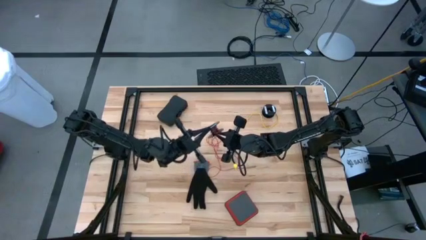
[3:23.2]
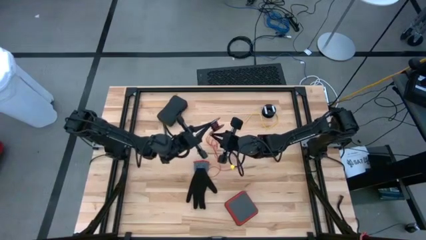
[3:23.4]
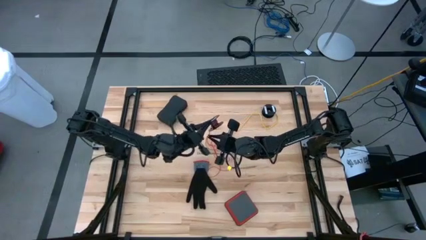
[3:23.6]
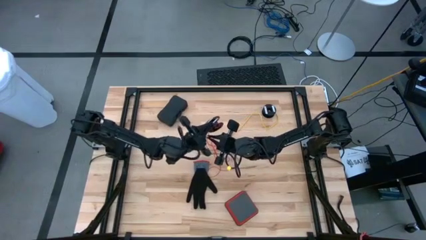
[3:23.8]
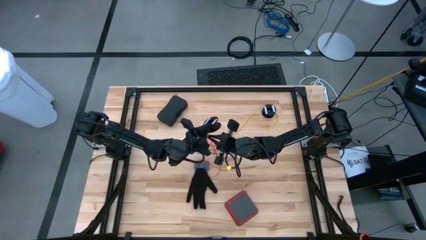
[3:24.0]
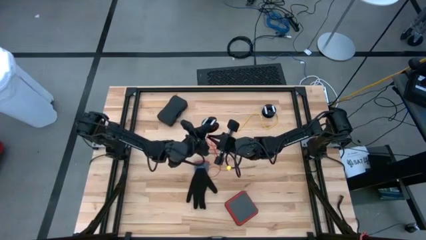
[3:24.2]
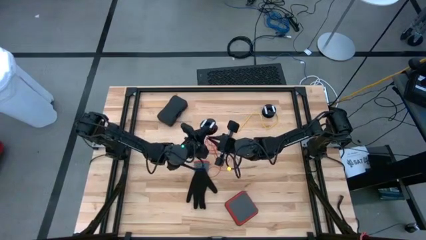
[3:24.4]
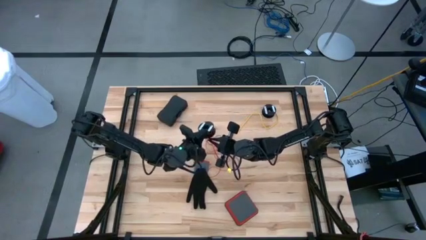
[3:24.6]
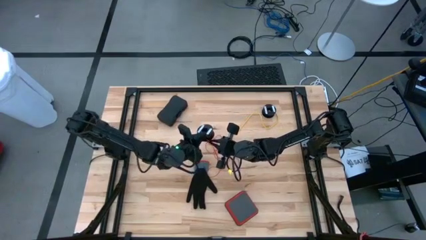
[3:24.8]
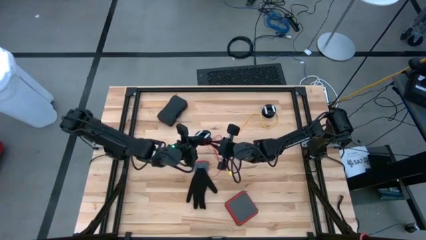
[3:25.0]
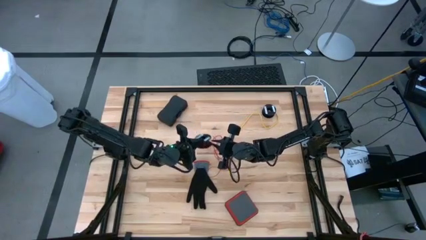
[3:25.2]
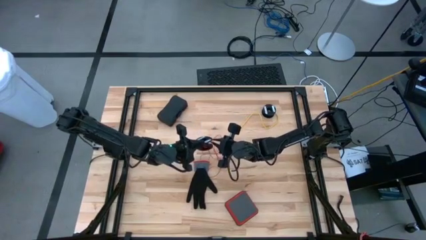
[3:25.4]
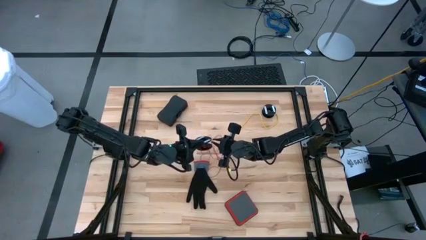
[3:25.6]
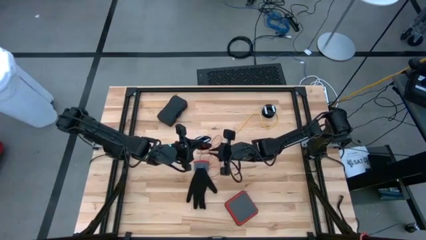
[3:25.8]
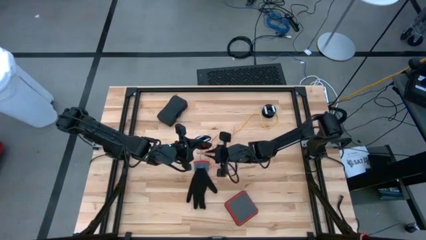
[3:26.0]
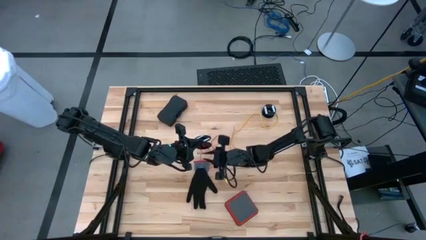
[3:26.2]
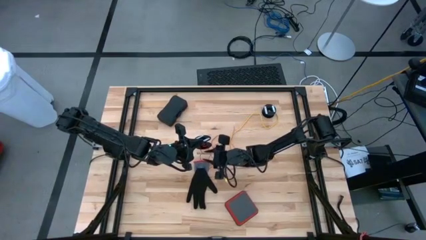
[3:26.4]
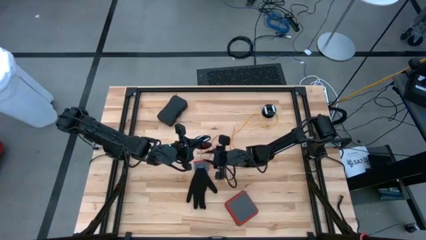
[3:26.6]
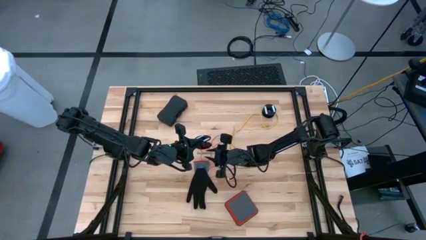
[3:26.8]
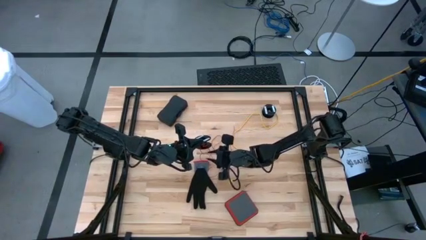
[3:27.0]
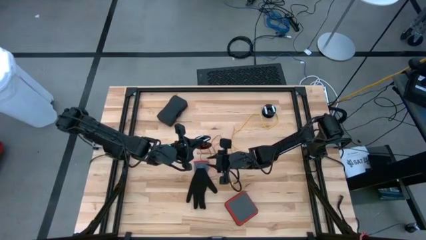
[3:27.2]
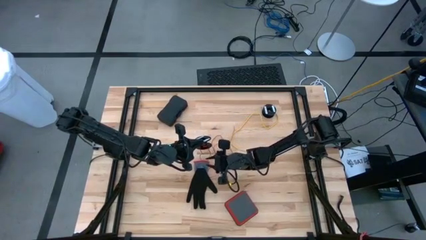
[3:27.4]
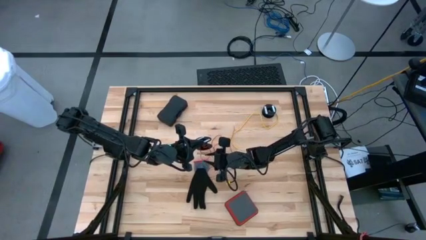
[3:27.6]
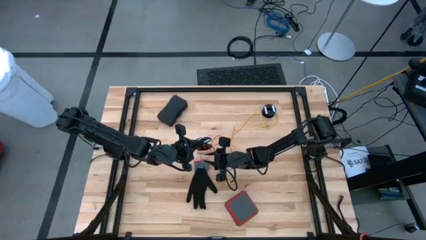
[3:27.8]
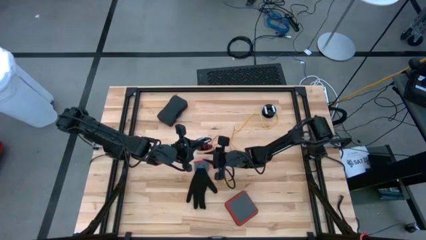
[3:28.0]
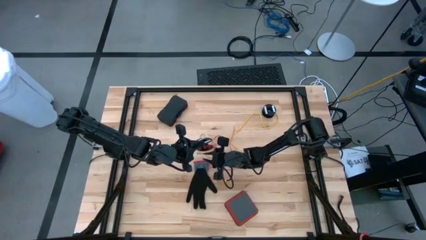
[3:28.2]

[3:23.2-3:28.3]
Task: Coil cords
Coil the red wire onto the black spool

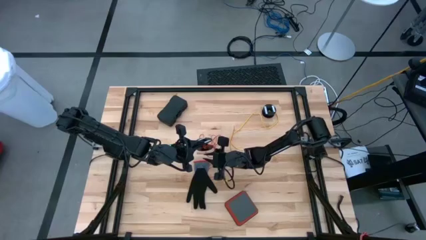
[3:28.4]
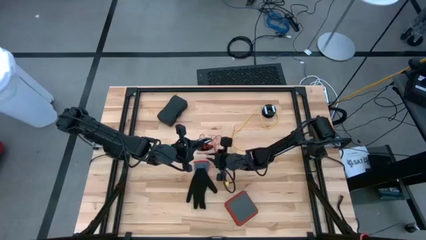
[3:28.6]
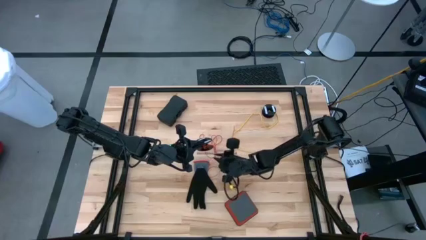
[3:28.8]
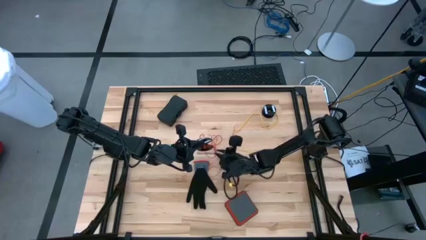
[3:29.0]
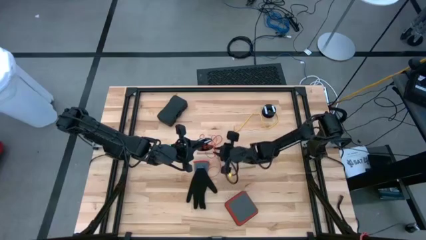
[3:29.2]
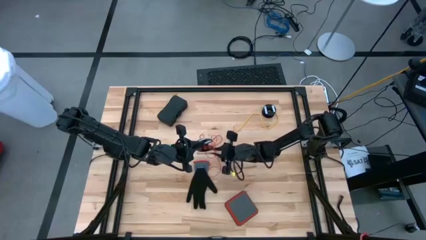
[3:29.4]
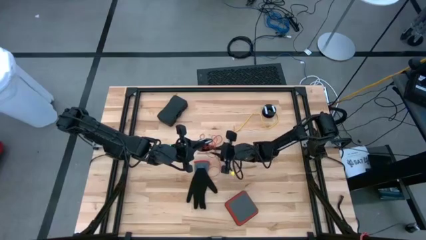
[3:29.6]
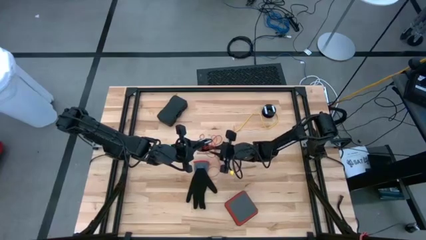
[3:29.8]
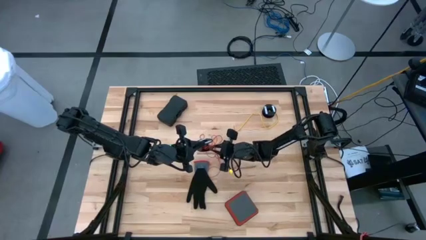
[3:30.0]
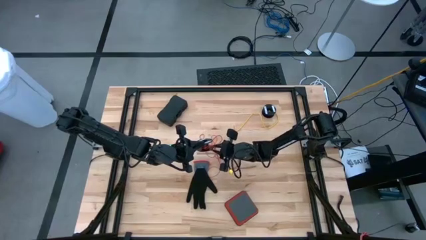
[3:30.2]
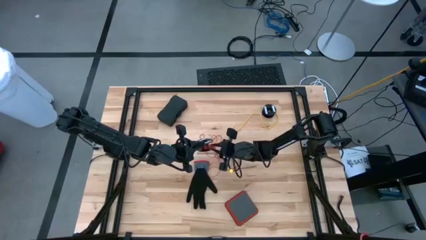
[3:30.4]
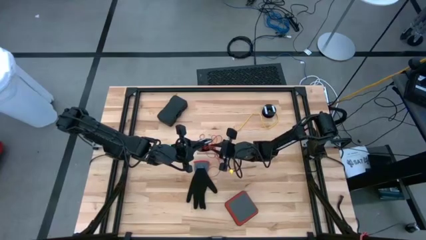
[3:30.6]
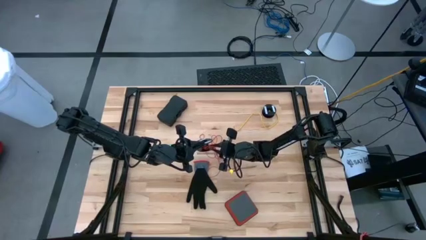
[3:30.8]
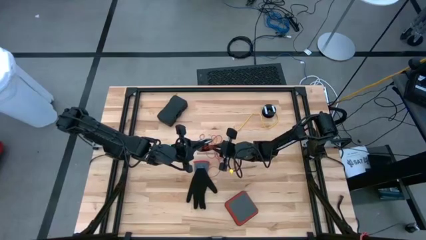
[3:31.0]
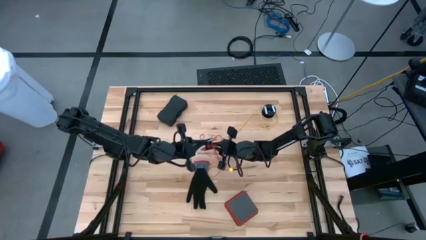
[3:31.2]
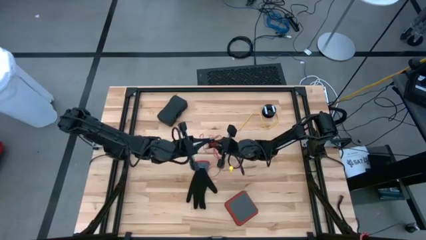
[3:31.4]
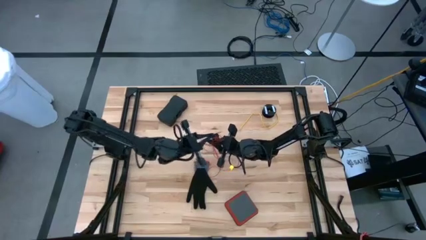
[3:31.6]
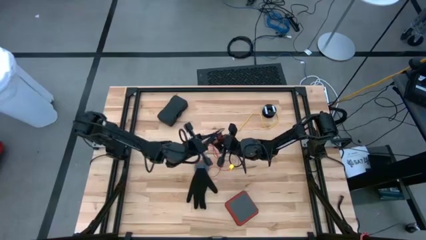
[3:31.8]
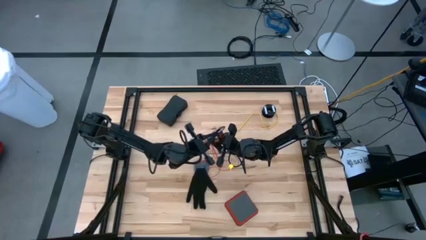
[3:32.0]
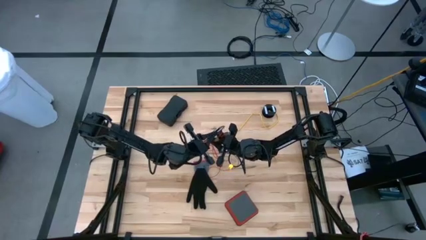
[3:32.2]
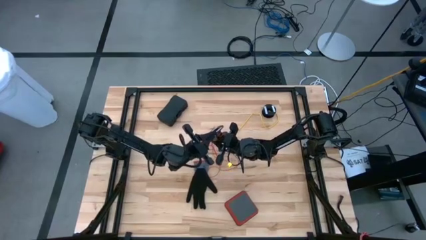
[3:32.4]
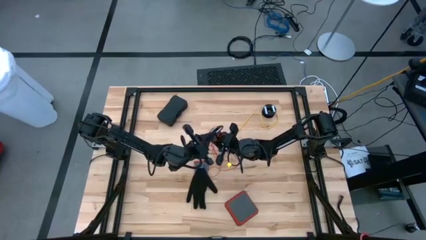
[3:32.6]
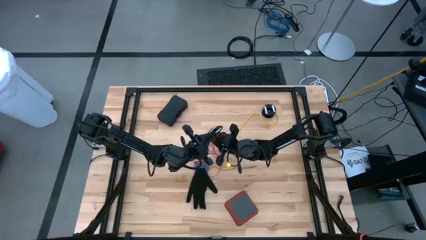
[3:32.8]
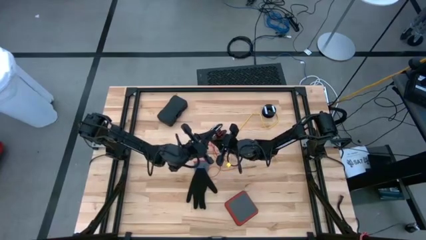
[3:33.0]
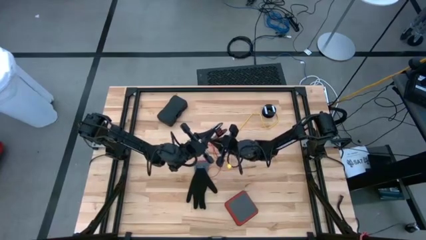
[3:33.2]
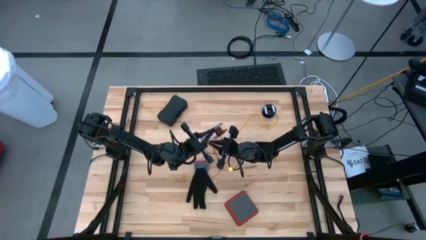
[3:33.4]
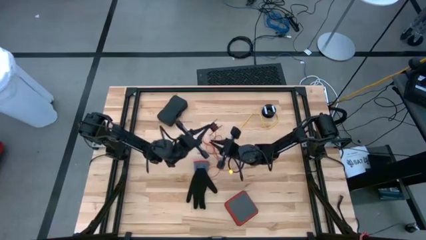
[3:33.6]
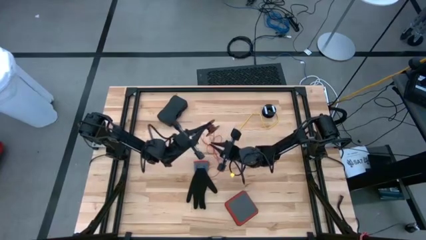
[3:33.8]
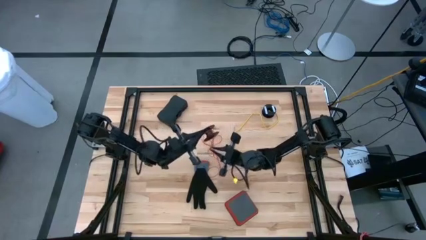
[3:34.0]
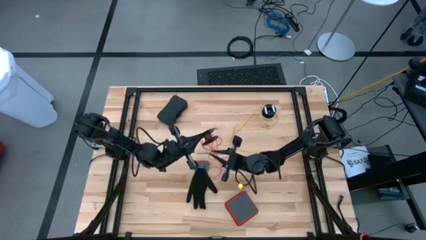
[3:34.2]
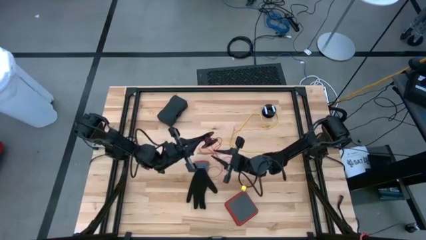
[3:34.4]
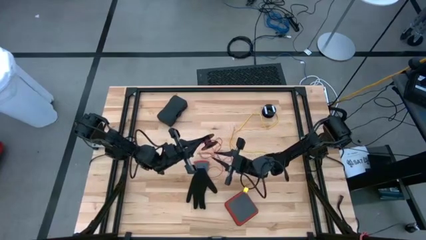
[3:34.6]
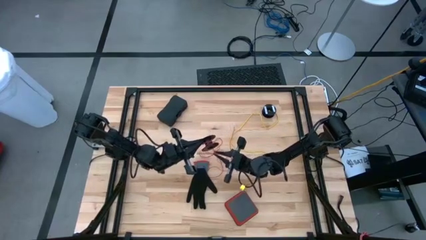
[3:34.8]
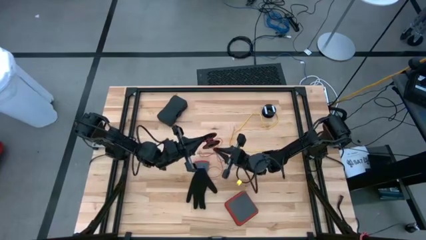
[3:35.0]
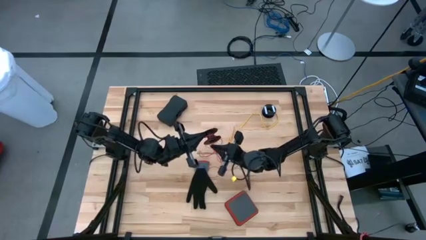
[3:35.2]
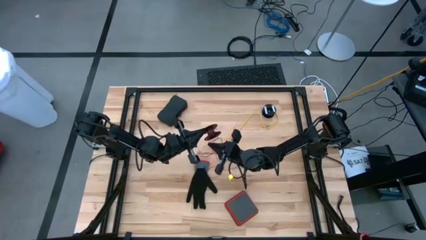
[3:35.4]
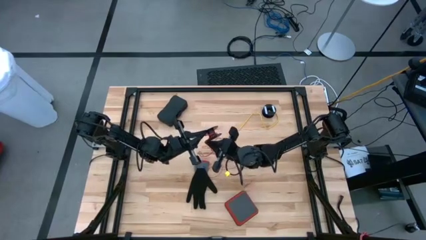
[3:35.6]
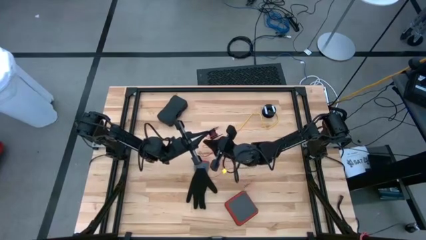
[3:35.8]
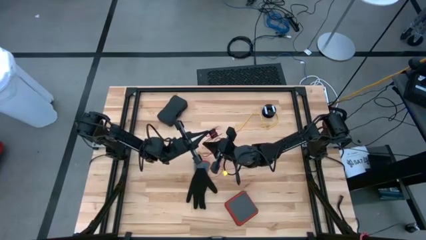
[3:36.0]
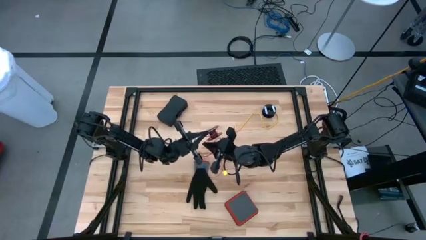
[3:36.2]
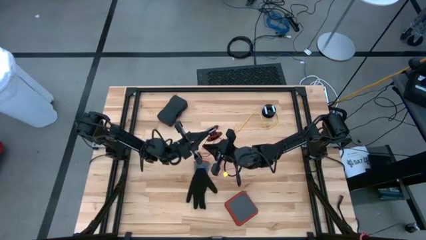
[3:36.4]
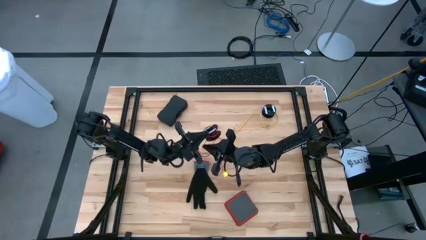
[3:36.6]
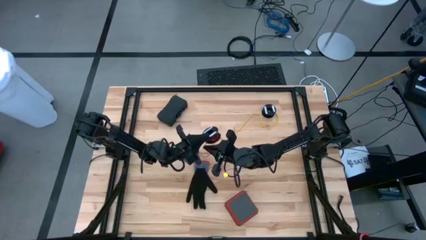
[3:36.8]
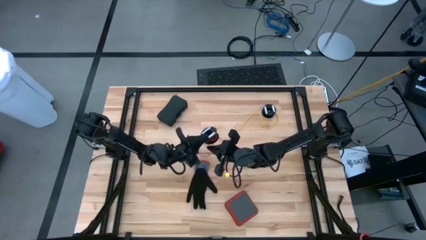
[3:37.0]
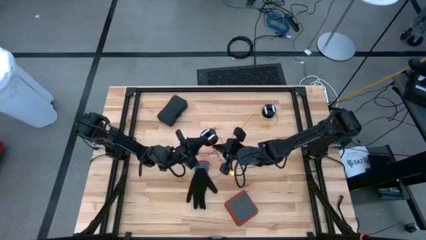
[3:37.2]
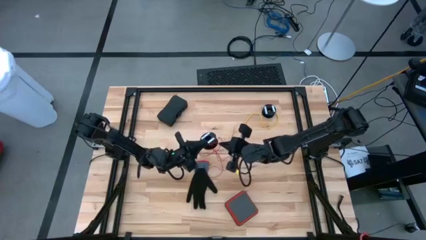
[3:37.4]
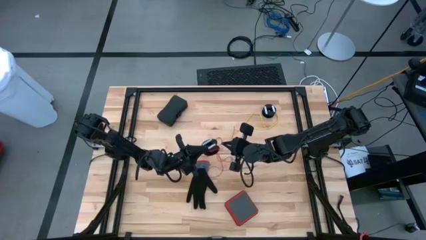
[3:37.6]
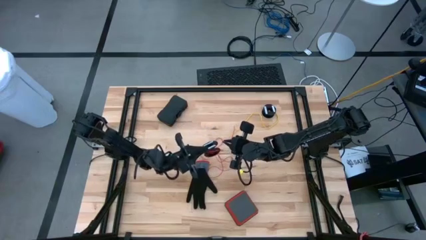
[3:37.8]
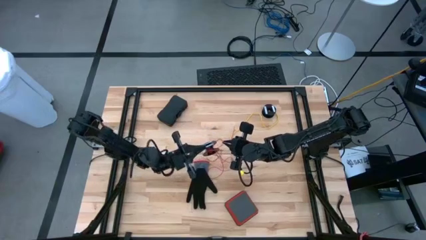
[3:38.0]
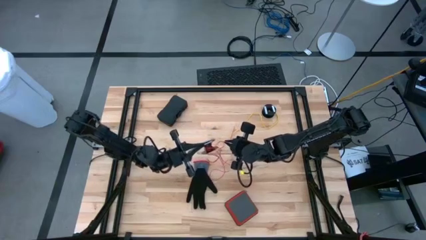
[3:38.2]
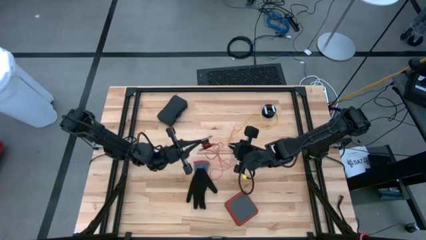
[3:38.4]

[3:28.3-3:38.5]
Coil the red wire onto the black spool

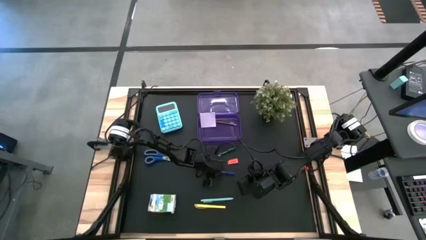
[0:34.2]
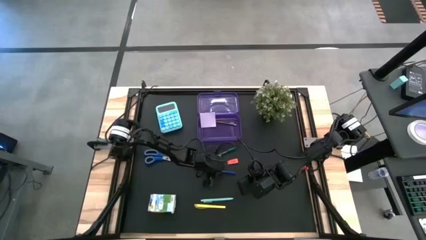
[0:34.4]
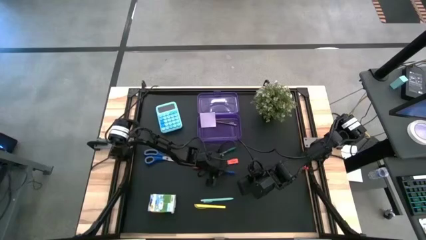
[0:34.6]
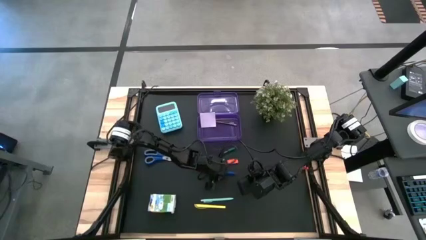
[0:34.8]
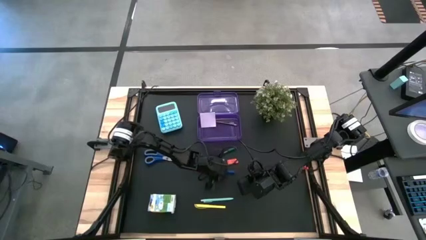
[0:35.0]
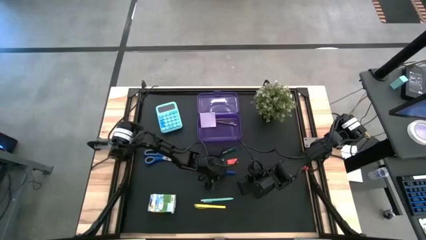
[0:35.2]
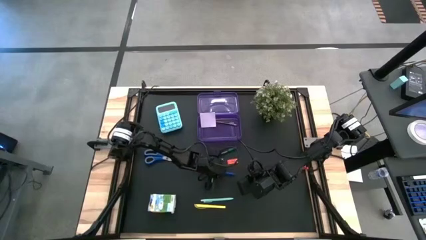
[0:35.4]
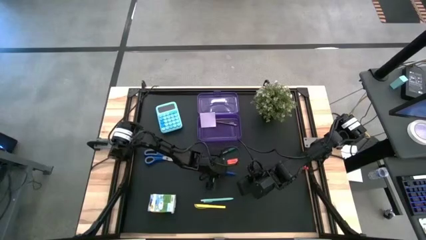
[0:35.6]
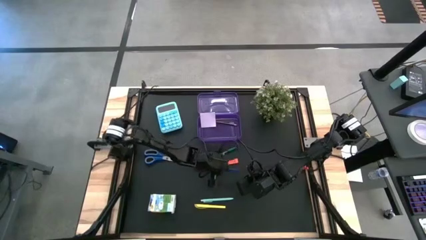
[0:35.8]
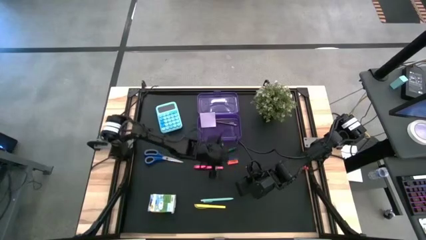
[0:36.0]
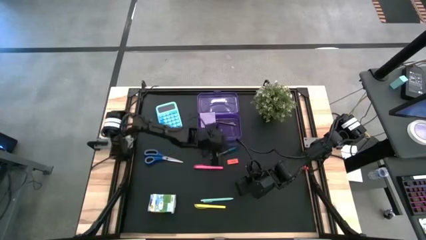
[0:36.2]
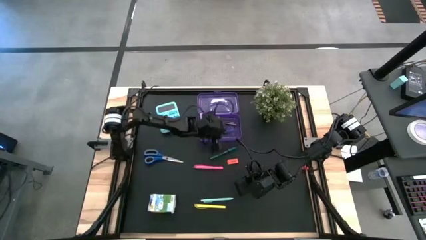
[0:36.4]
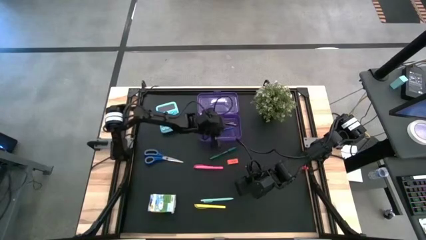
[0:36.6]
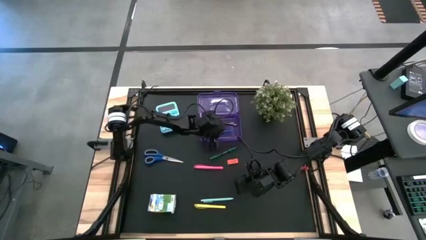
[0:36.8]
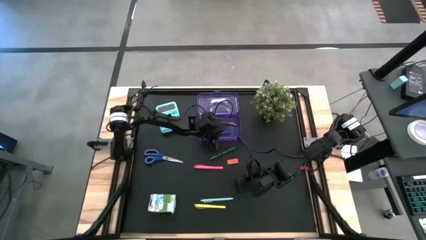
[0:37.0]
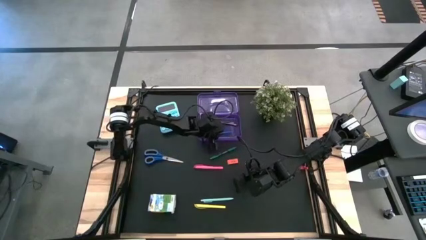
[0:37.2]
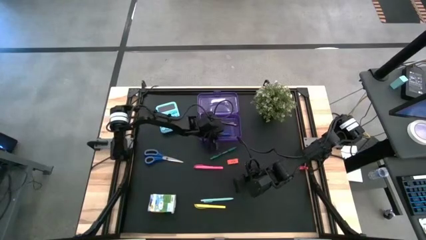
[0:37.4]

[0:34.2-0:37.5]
Task: Pack school essentials
Put the blue pen into the purple supply box
